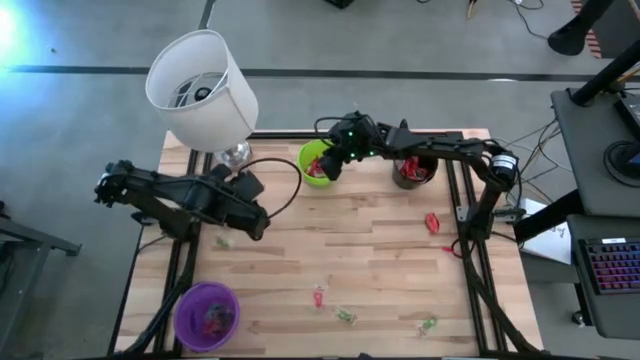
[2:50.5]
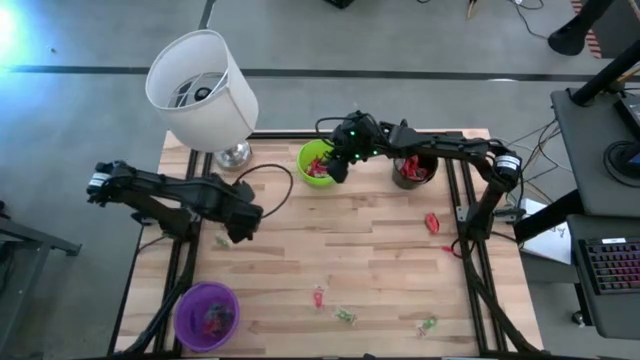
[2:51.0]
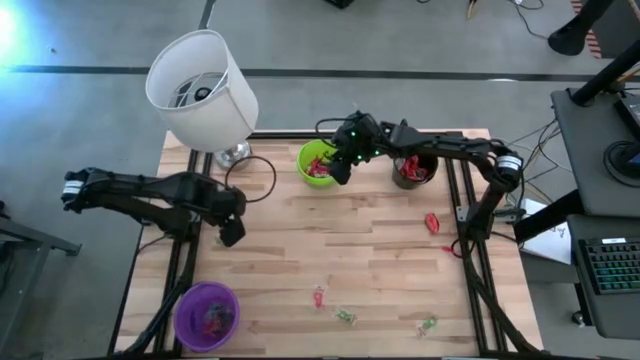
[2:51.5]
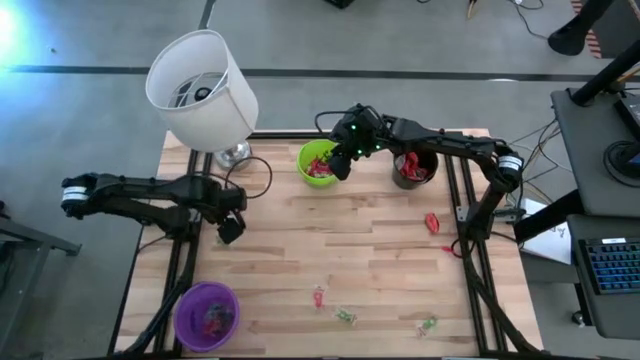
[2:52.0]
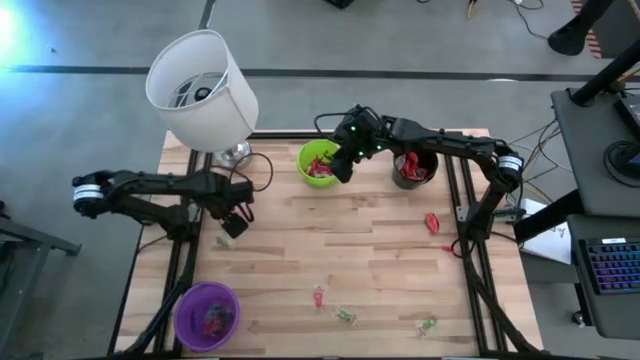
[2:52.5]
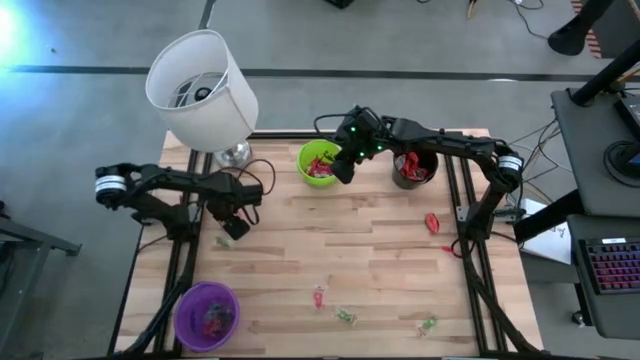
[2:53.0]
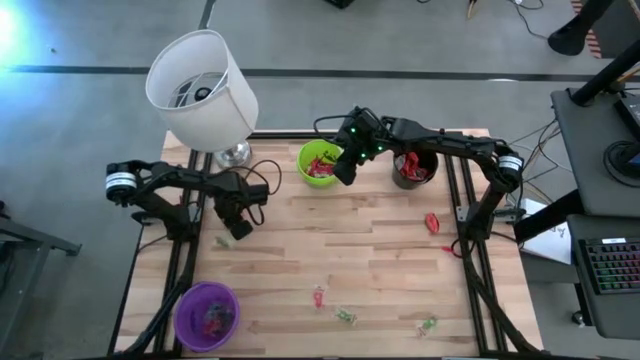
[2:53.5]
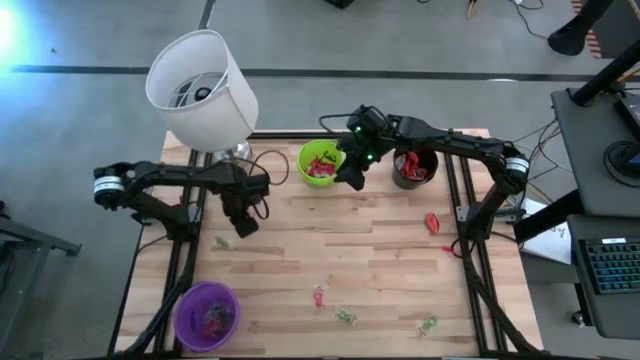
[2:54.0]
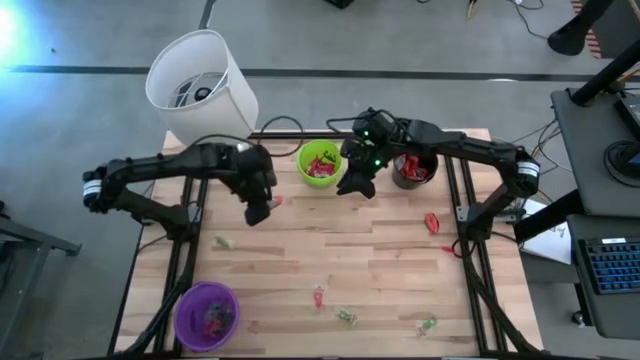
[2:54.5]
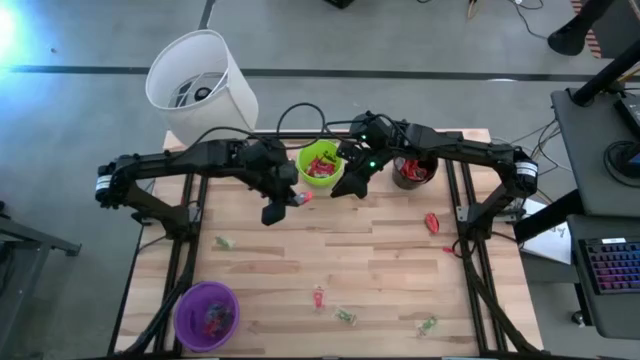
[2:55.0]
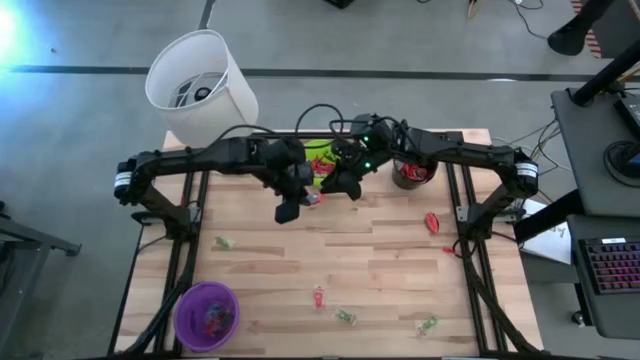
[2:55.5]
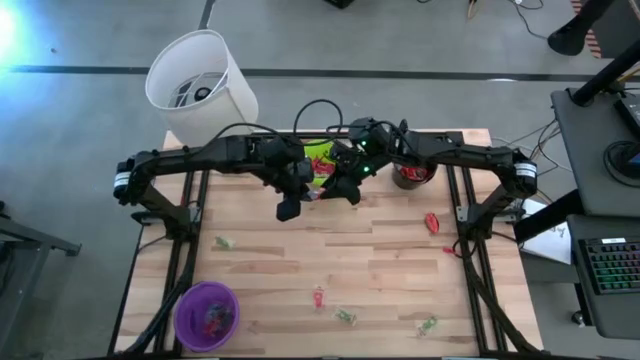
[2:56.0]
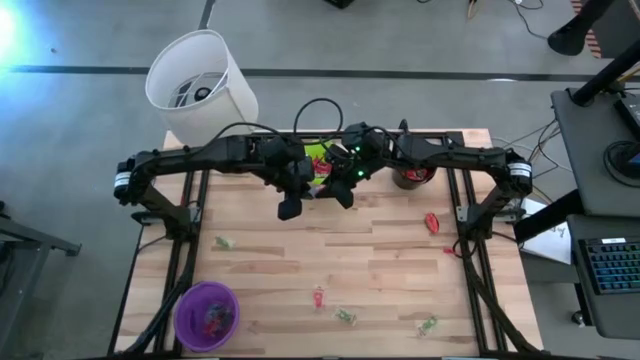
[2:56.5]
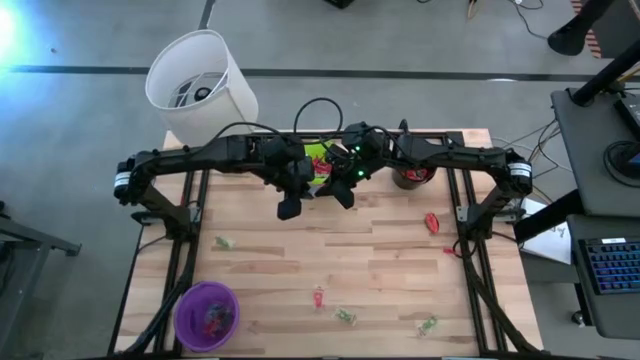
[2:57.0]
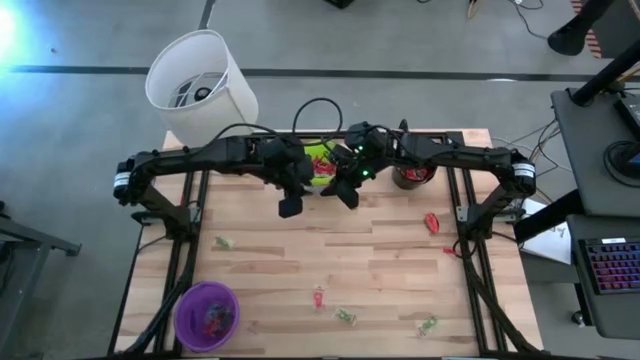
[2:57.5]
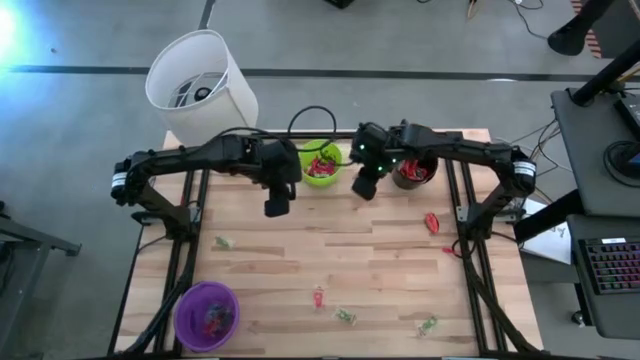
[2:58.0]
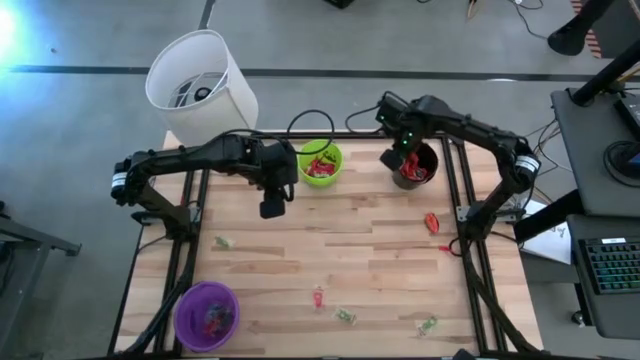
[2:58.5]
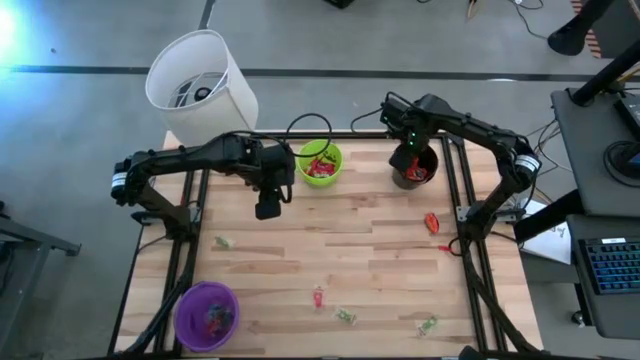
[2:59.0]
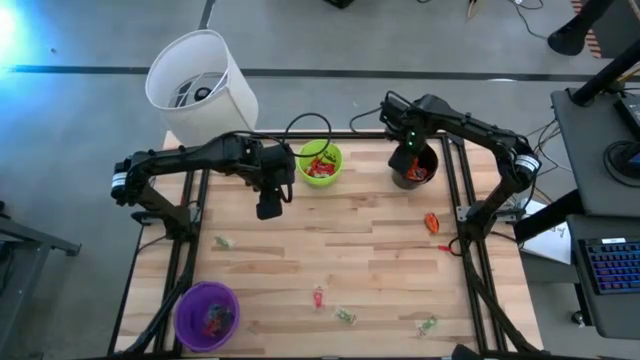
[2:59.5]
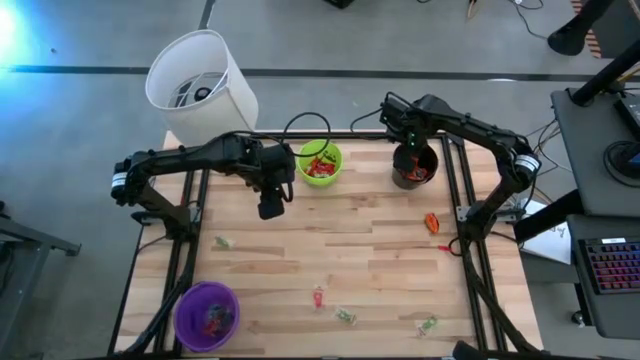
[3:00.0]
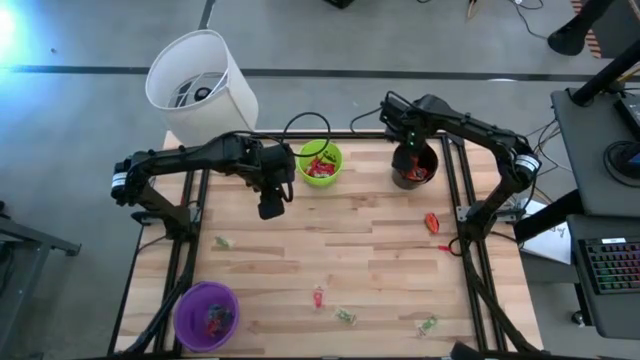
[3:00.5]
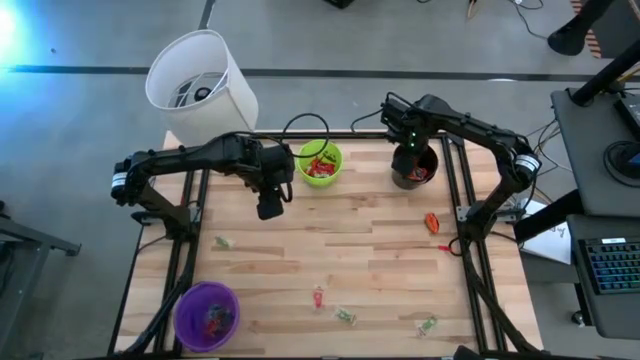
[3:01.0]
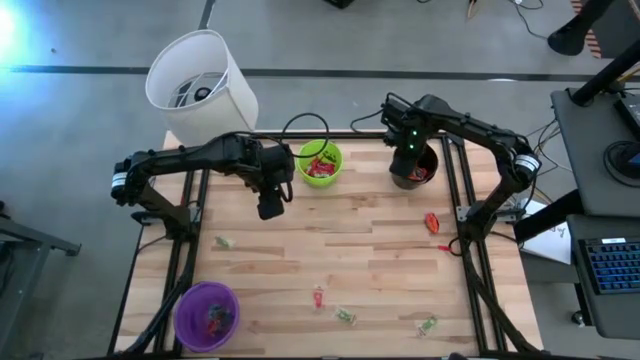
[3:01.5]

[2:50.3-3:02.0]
Task: Sort candy
Put the orange candy into the black bucket

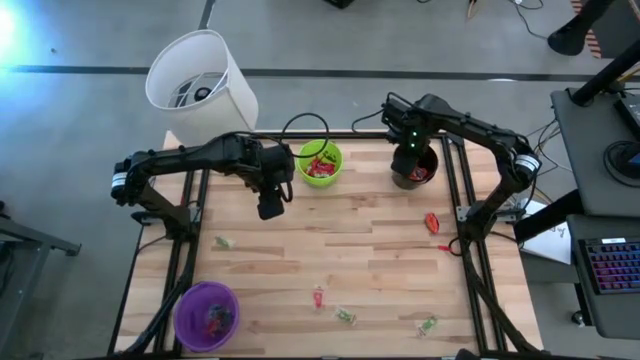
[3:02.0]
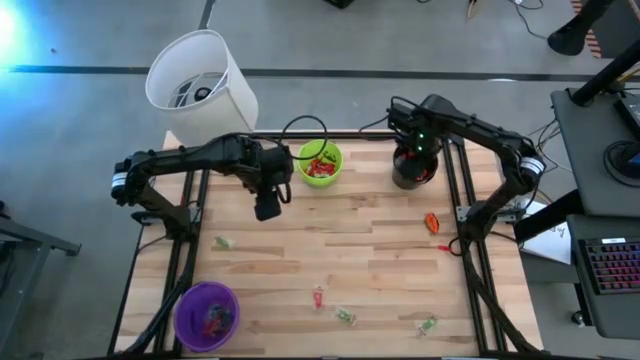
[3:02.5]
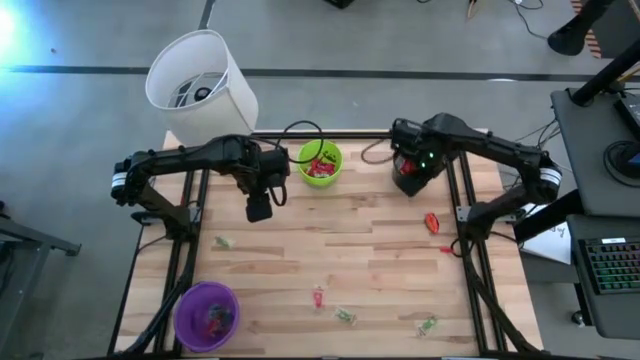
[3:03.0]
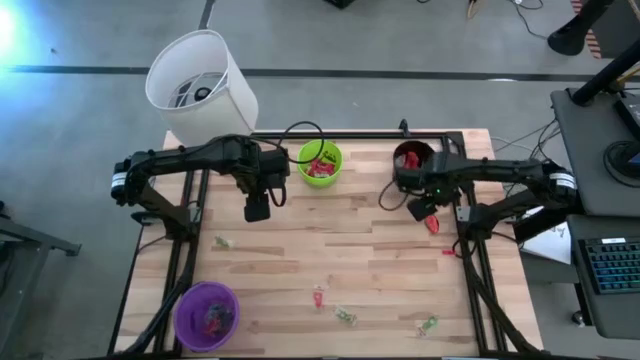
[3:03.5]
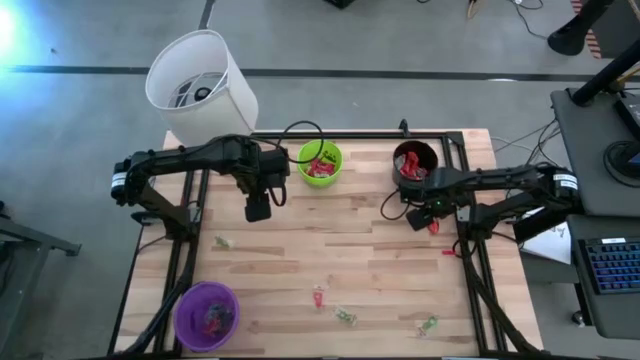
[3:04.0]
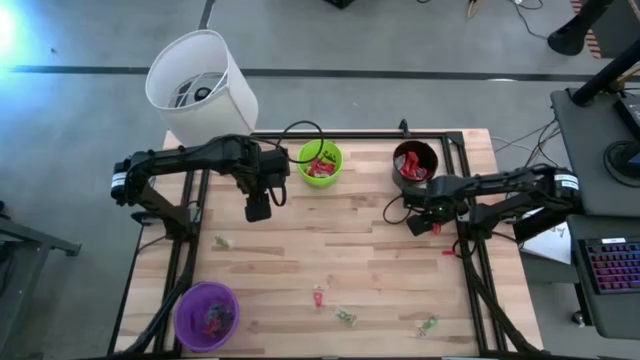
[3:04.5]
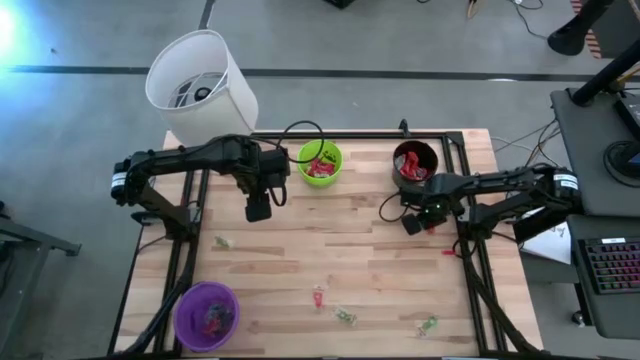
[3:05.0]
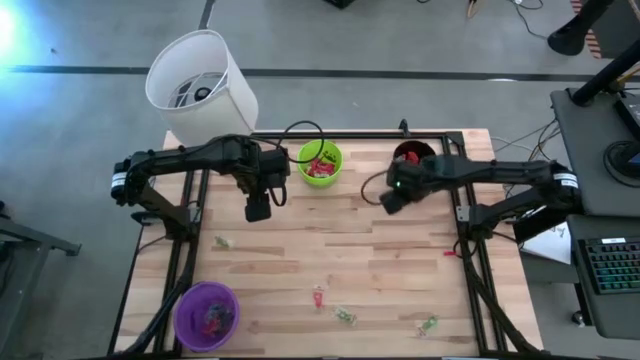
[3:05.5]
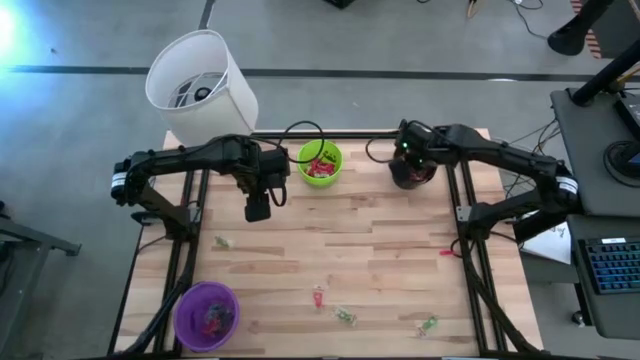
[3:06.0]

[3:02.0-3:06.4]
Put the orange candy into the black bucket

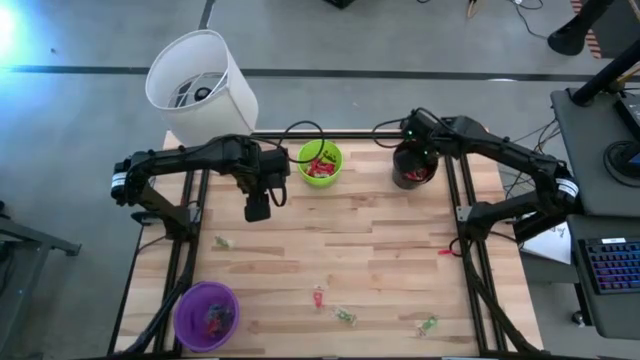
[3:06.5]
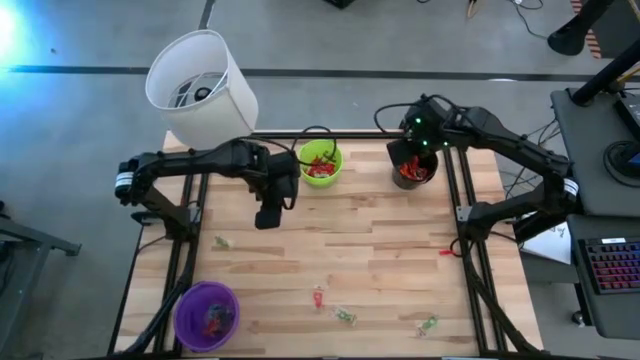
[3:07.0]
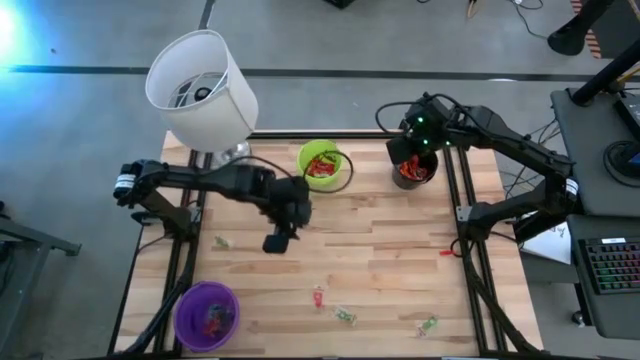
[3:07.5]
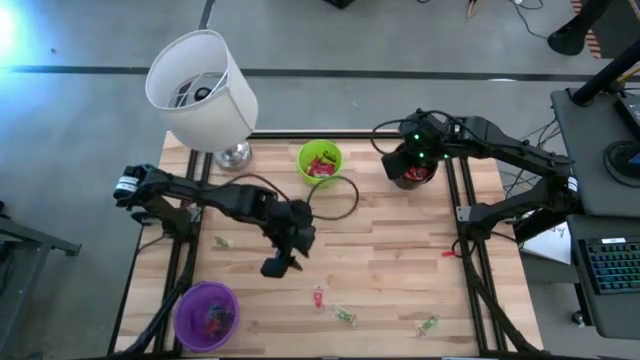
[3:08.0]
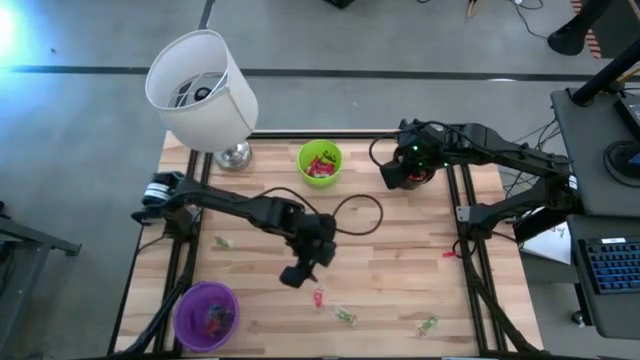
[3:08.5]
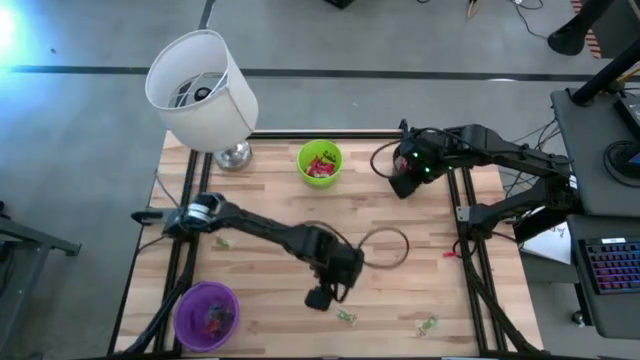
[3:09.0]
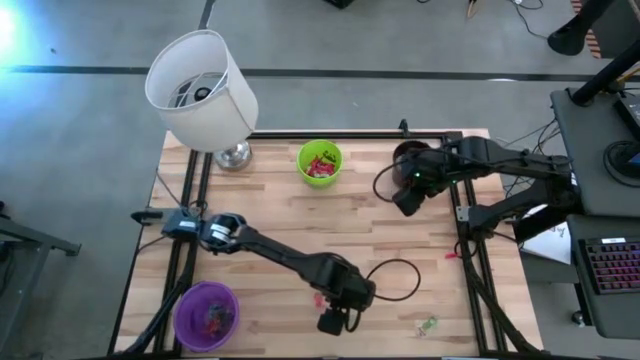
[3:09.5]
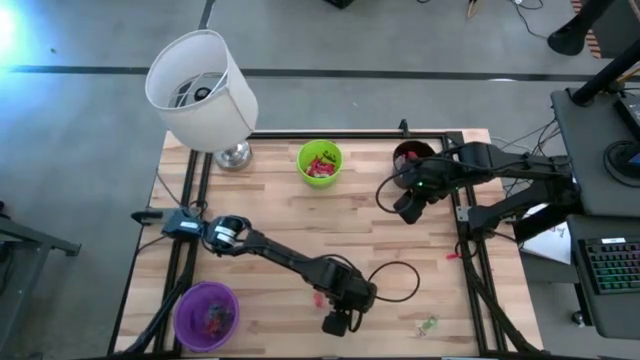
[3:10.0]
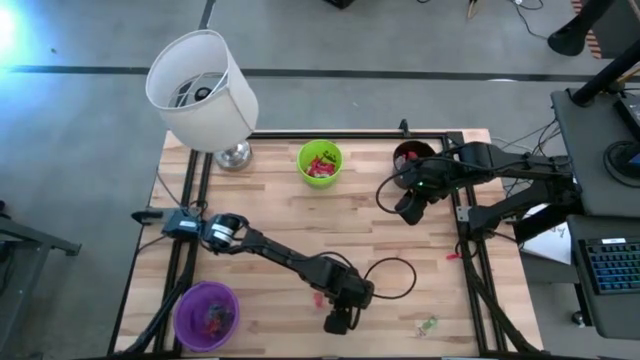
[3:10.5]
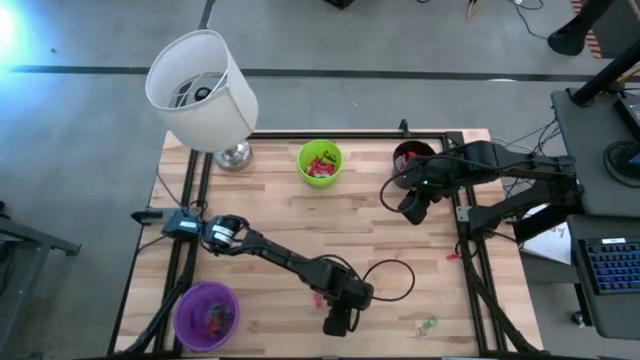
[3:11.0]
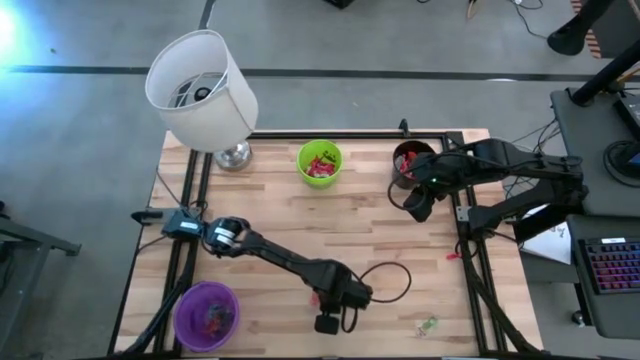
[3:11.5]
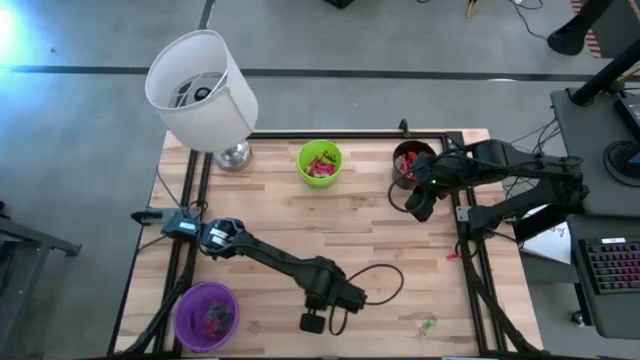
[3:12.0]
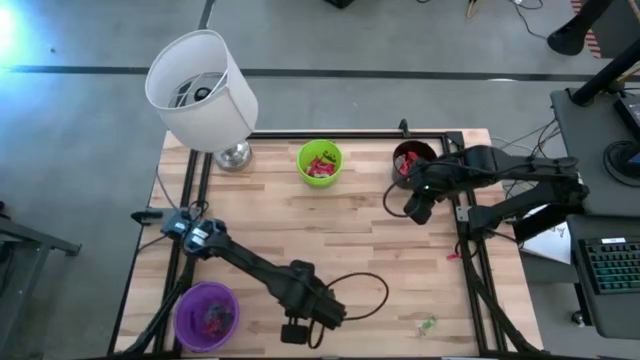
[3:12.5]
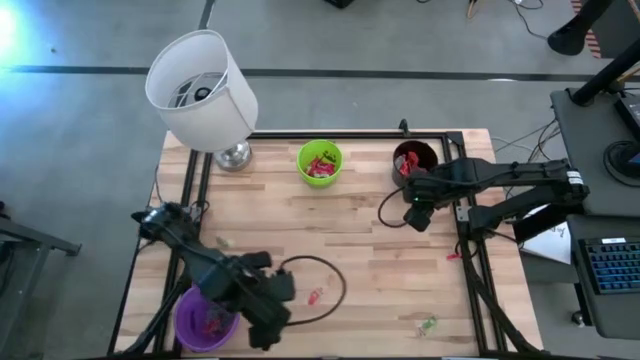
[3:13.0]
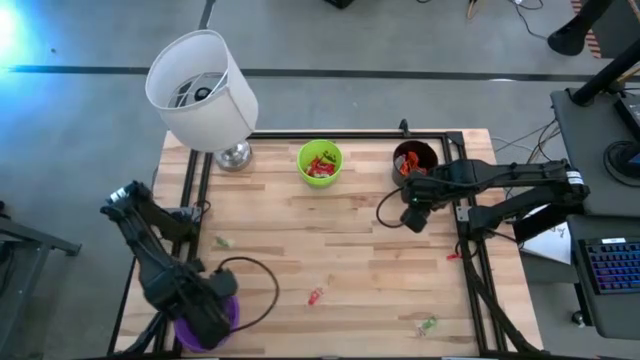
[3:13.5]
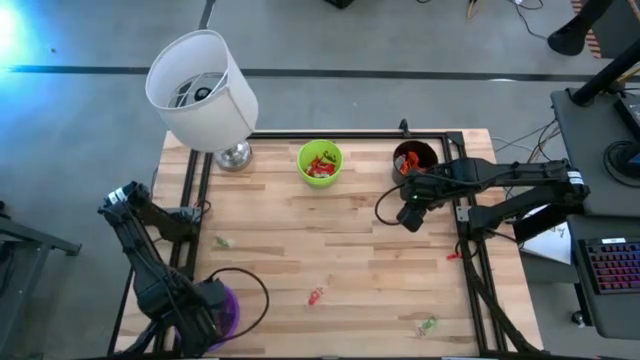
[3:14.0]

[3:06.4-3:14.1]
Put the green gummy candy into the violet bucket
